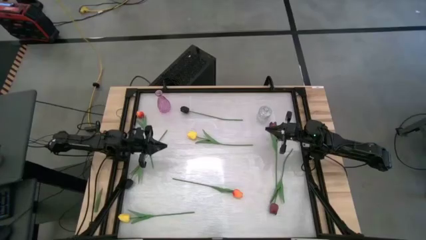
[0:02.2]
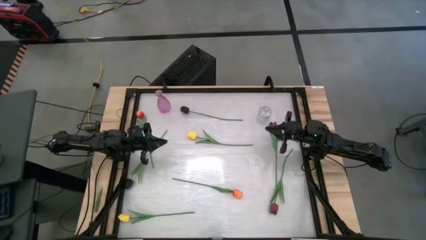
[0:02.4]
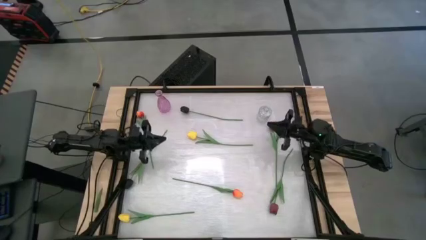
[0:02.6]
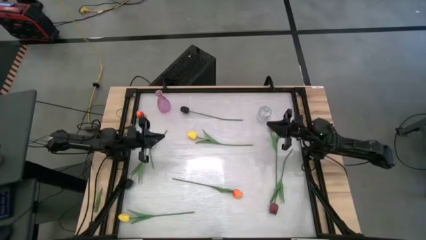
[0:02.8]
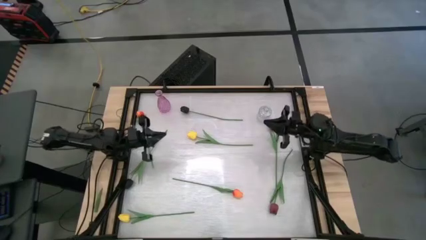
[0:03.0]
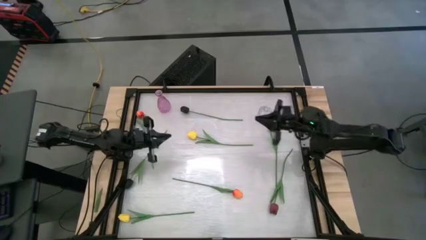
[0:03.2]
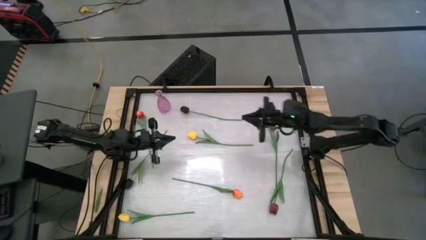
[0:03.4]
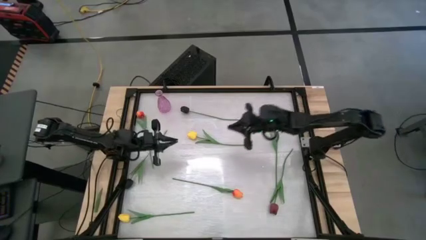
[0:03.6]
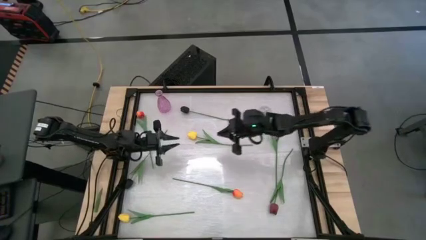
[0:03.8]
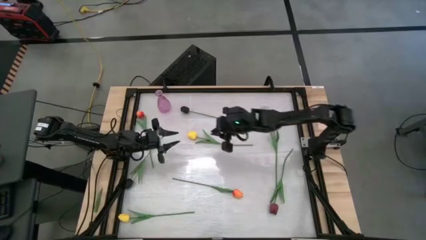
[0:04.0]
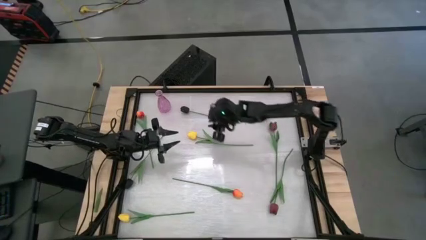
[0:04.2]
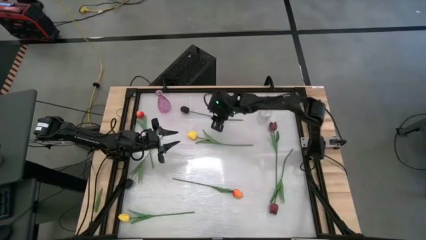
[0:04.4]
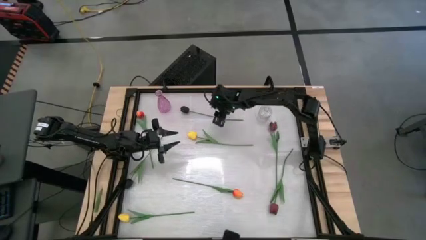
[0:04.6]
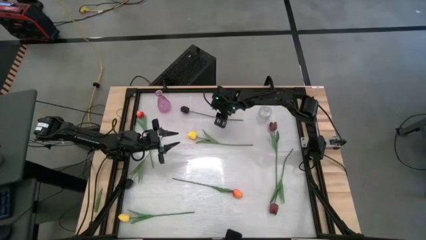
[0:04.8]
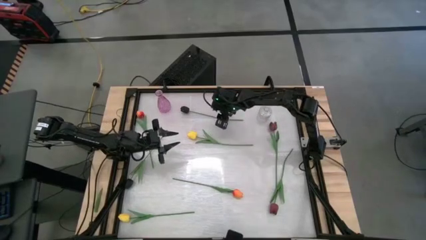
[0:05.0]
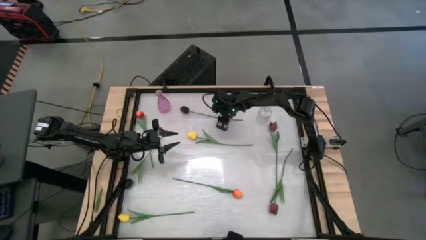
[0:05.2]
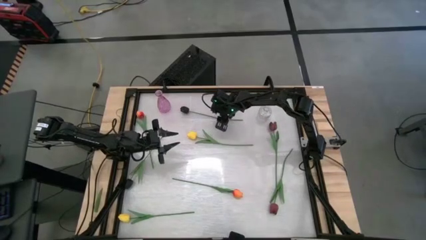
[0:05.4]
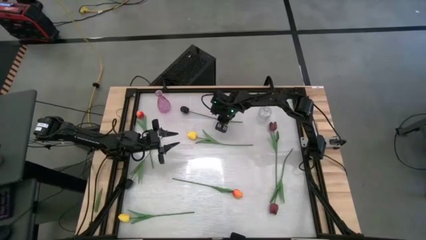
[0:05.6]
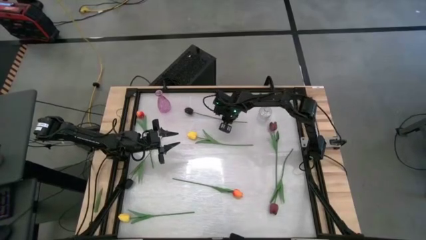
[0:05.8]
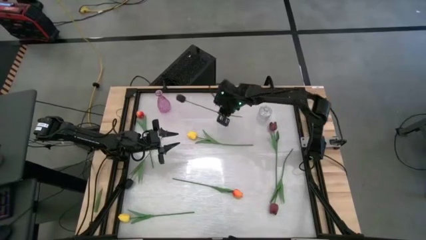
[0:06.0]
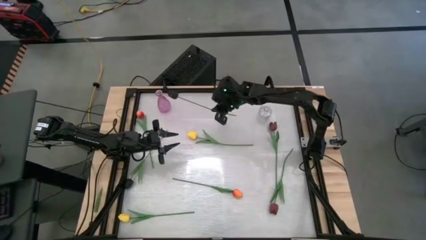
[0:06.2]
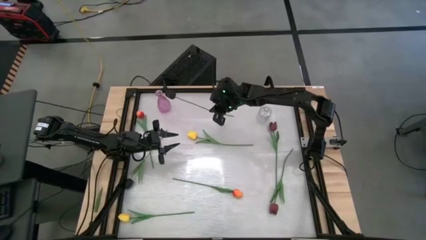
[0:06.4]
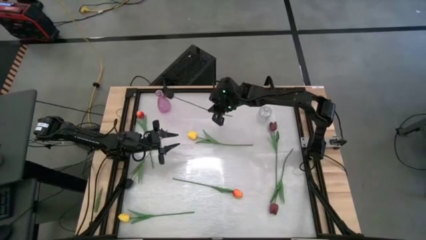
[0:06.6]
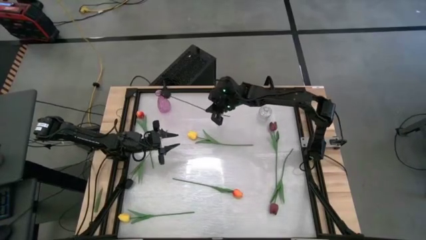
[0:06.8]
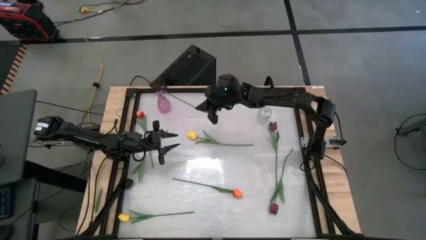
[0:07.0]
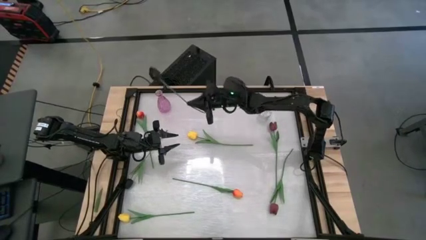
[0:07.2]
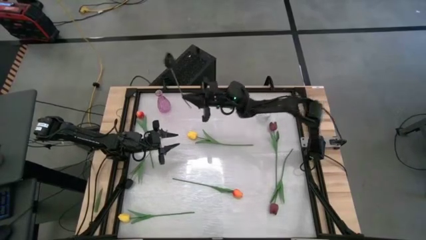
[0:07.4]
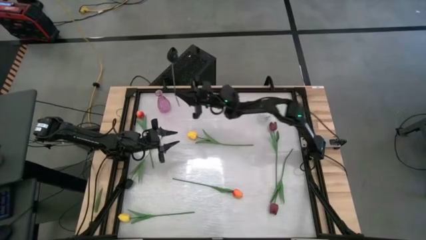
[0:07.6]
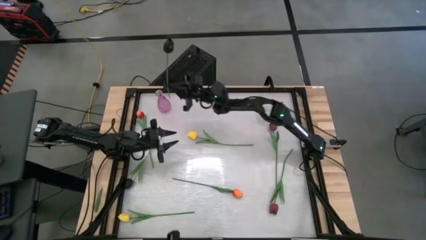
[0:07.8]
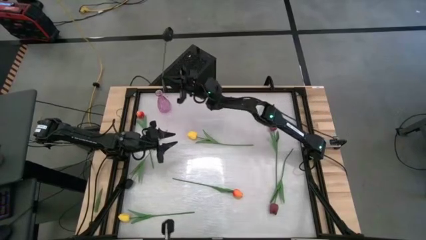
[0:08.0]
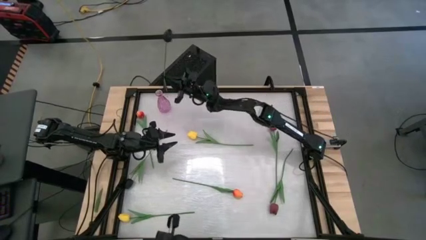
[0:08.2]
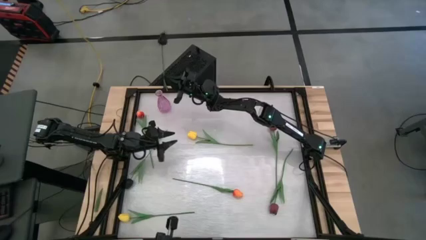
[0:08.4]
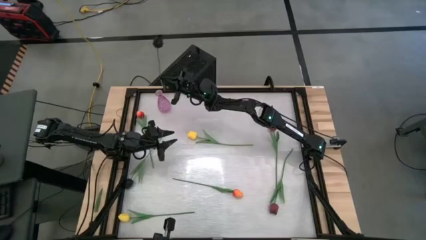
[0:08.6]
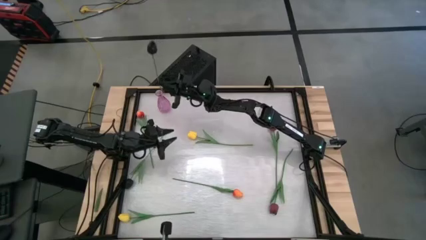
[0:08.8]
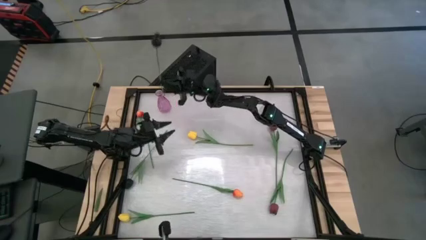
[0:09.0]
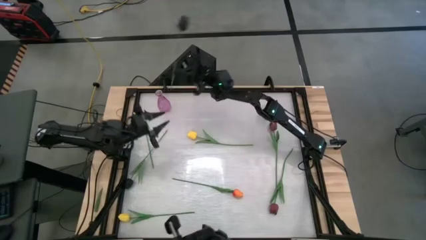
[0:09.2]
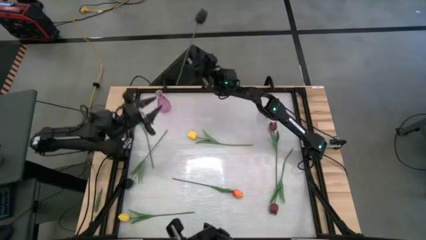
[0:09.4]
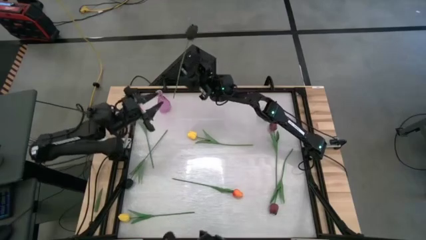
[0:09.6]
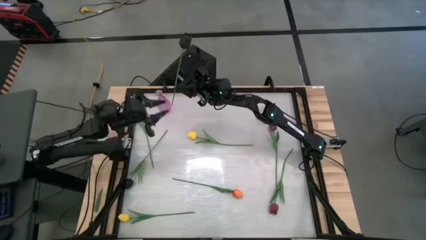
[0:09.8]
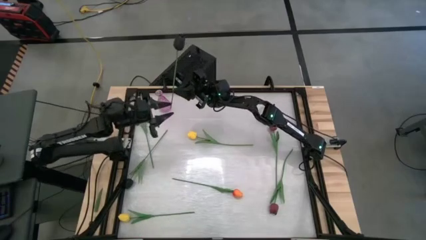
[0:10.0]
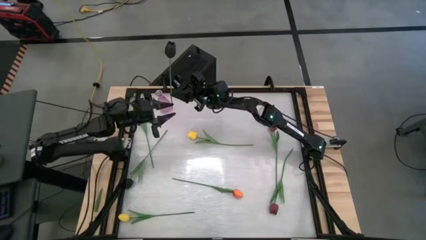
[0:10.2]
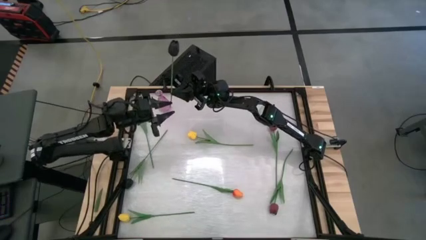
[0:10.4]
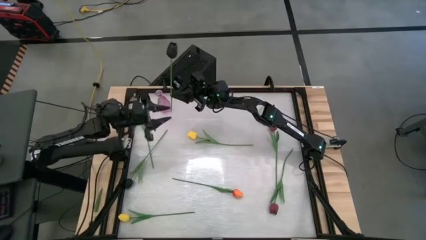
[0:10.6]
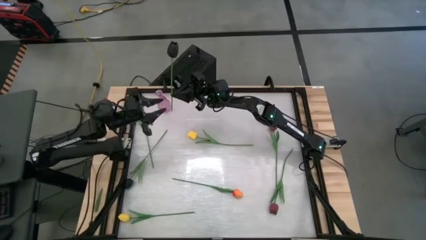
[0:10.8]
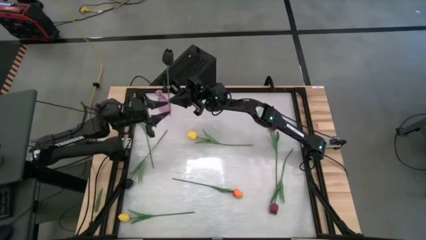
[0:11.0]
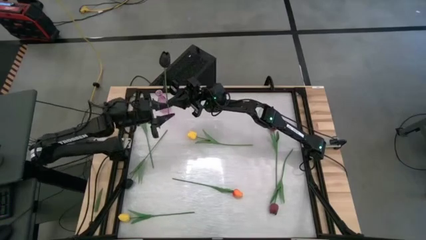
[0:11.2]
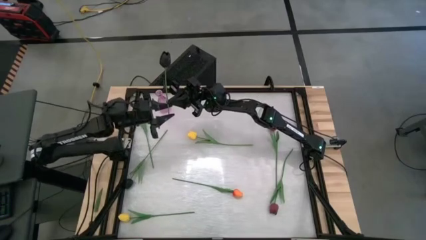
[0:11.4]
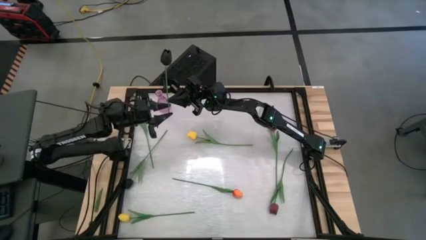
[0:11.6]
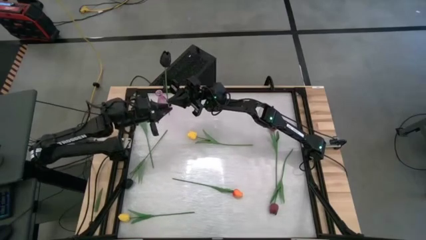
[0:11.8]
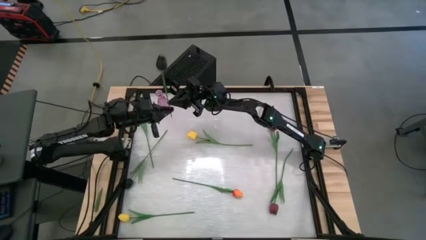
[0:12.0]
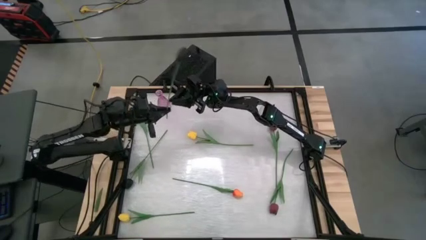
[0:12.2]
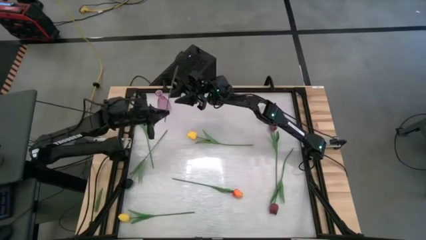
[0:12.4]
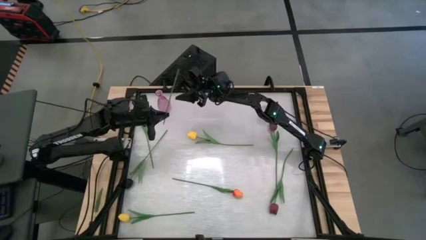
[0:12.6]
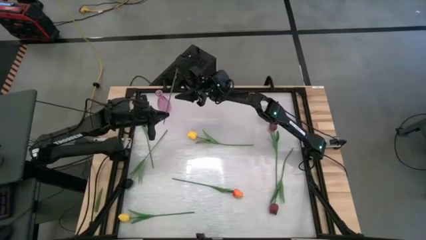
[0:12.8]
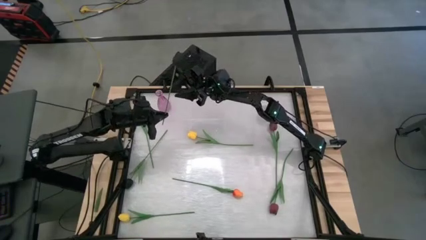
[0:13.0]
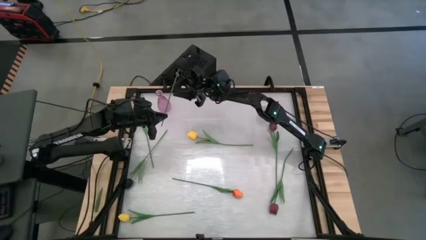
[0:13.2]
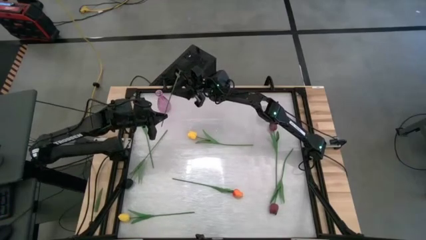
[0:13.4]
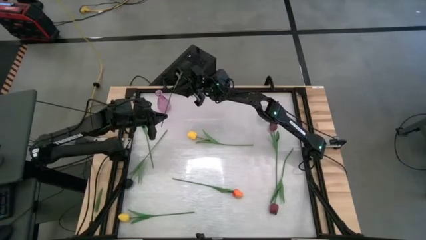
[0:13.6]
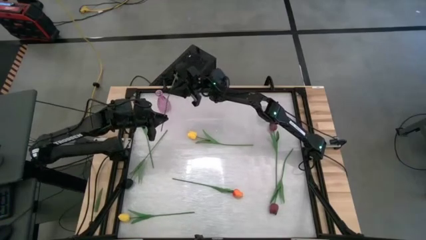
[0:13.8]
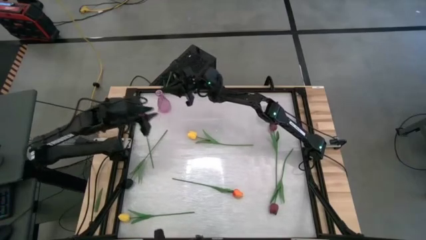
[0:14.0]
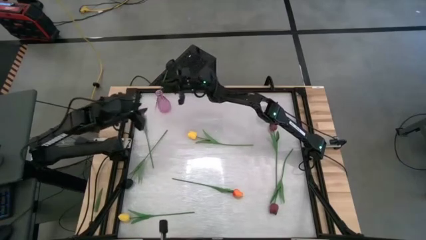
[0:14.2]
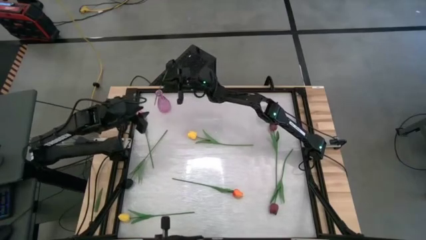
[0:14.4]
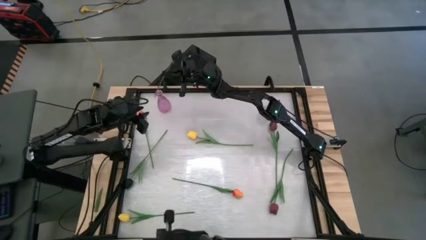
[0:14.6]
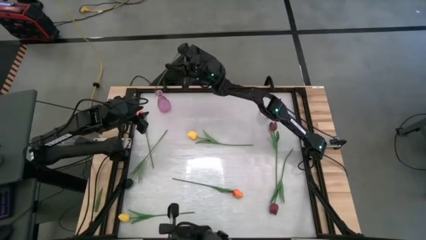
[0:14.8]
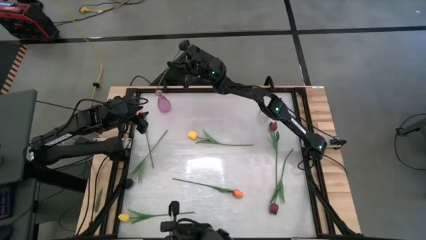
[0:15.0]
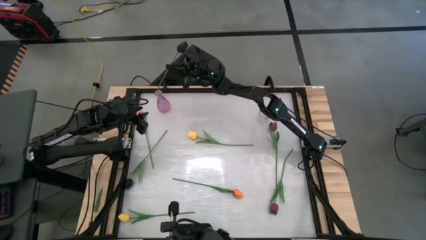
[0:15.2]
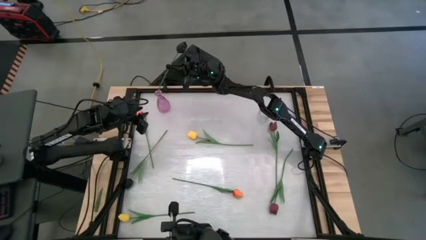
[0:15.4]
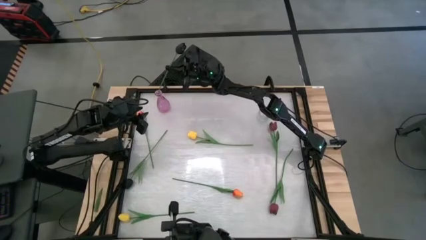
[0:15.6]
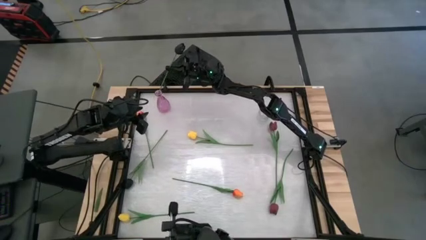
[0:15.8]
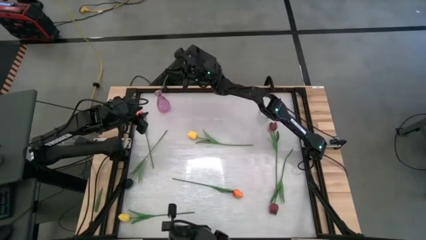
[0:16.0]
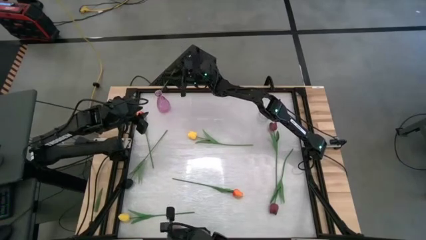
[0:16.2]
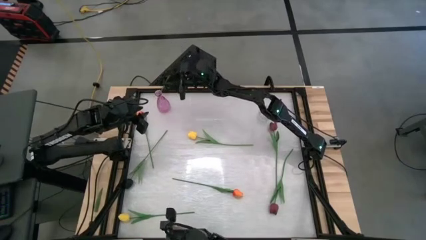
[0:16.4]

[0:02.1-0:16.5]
Task: Sort flowers into vase by color
Put the top black tulip into the violet vase
